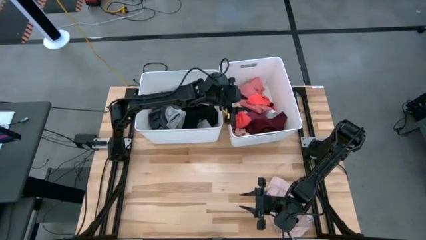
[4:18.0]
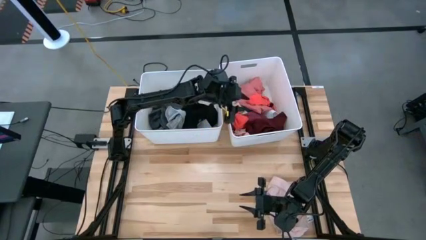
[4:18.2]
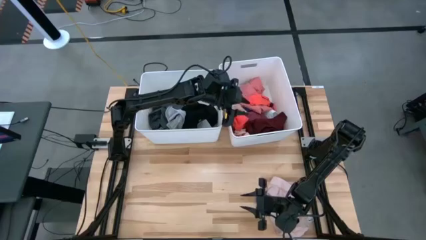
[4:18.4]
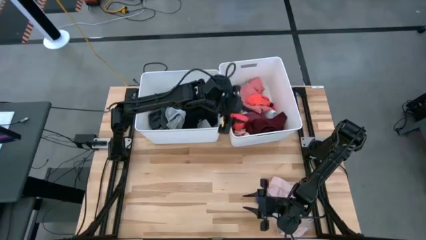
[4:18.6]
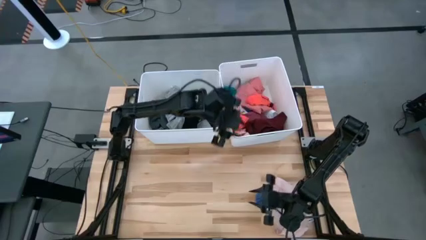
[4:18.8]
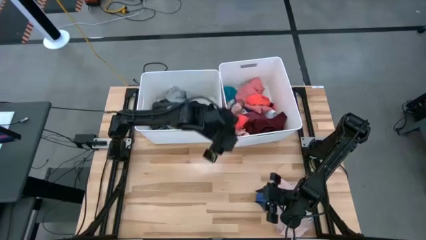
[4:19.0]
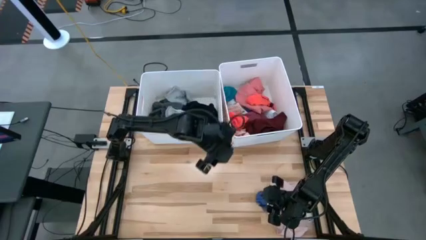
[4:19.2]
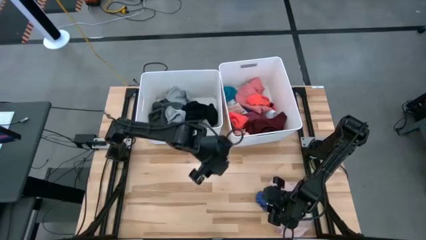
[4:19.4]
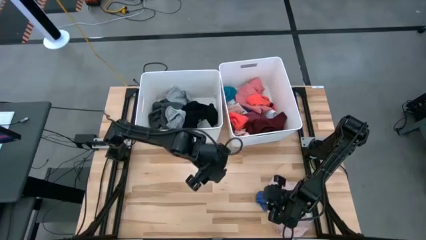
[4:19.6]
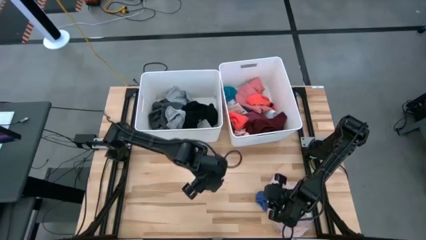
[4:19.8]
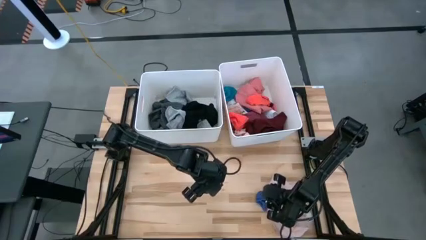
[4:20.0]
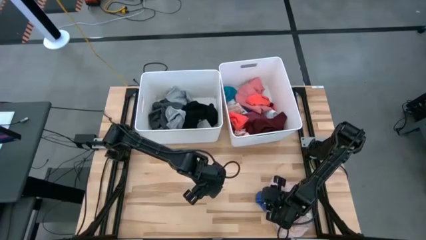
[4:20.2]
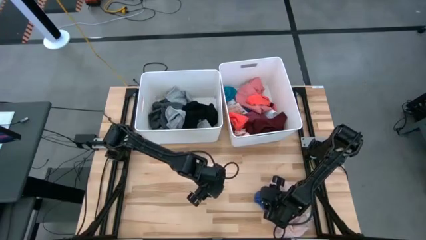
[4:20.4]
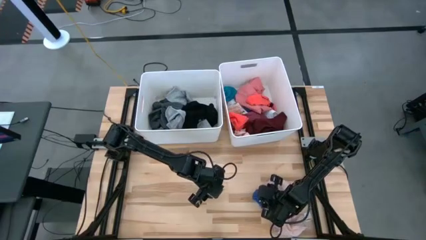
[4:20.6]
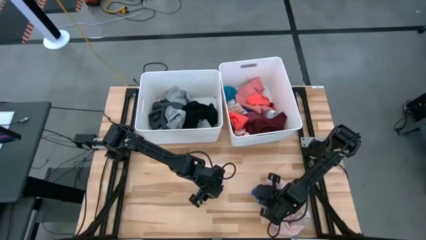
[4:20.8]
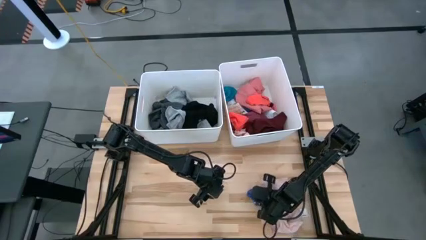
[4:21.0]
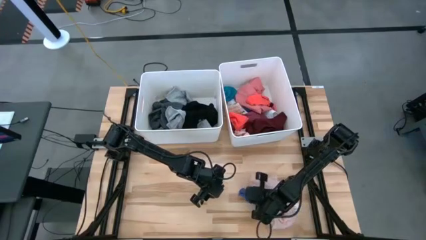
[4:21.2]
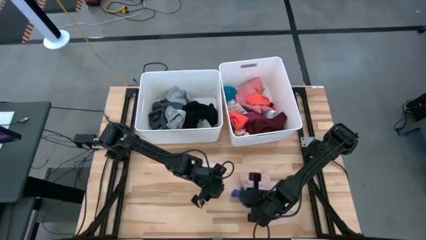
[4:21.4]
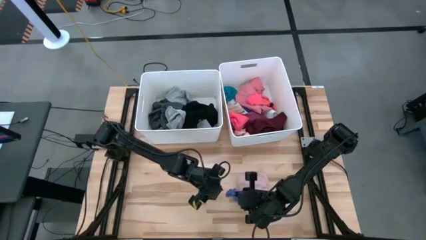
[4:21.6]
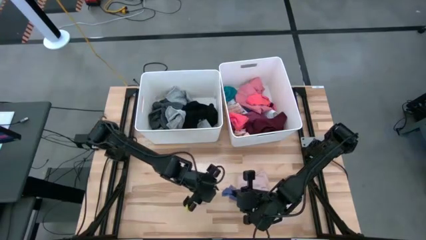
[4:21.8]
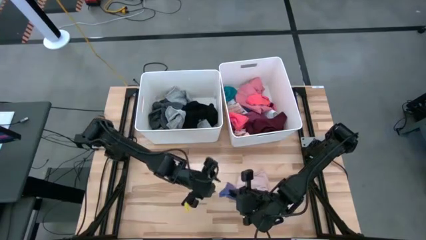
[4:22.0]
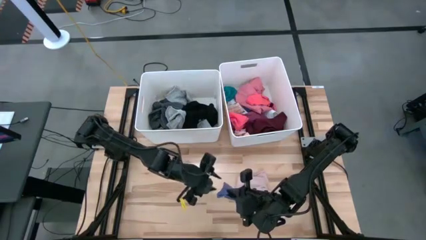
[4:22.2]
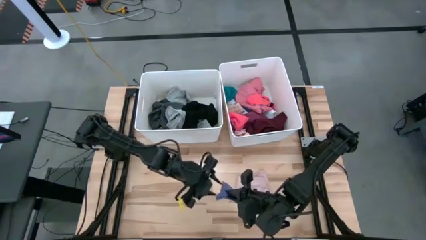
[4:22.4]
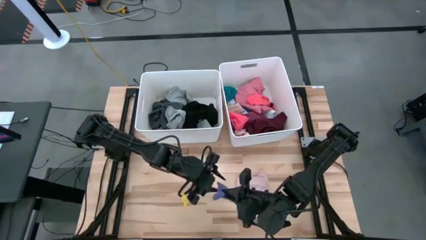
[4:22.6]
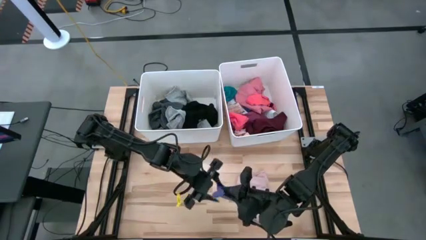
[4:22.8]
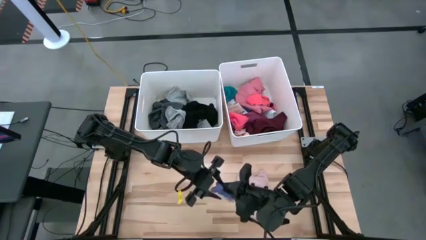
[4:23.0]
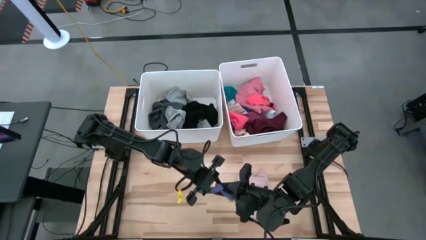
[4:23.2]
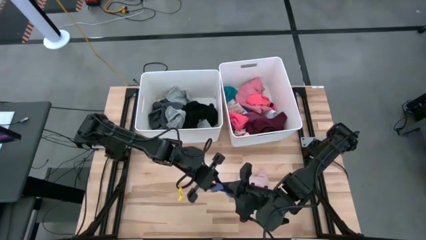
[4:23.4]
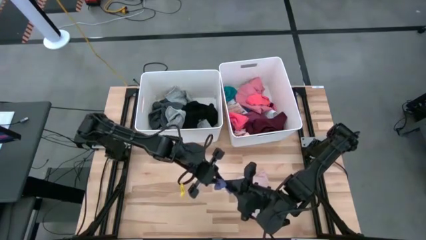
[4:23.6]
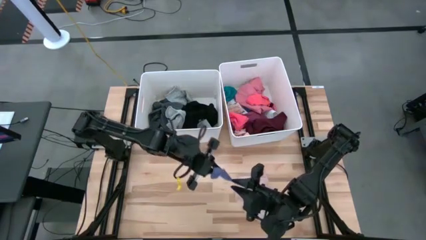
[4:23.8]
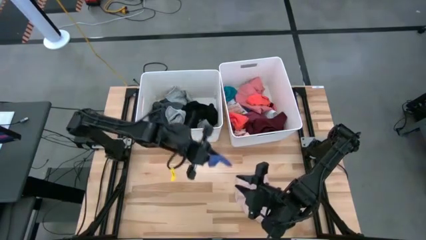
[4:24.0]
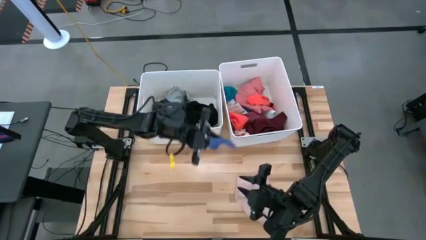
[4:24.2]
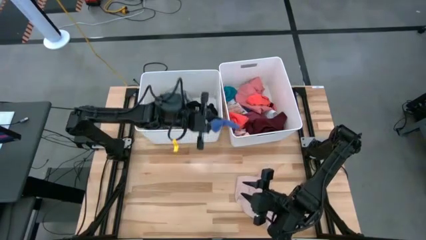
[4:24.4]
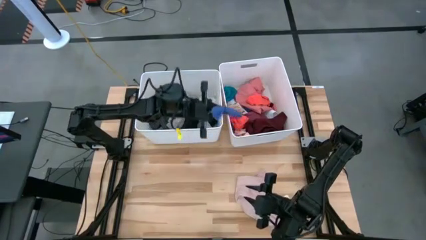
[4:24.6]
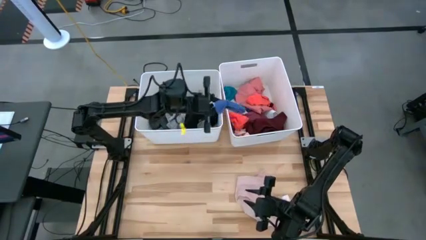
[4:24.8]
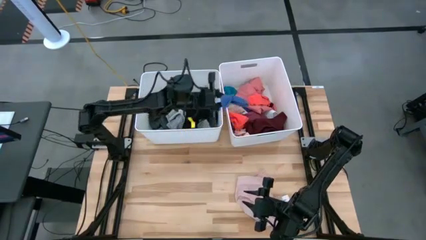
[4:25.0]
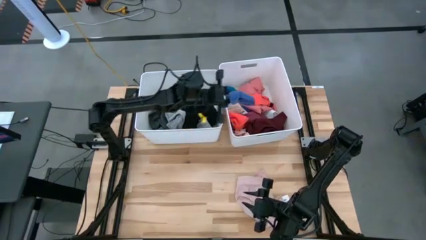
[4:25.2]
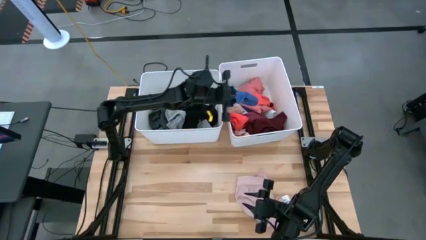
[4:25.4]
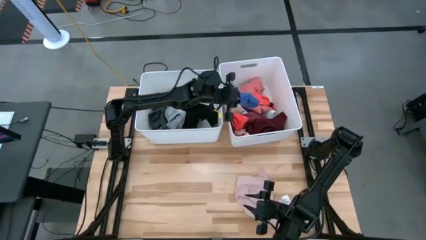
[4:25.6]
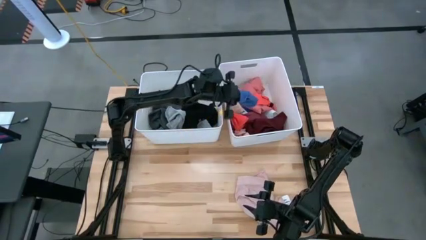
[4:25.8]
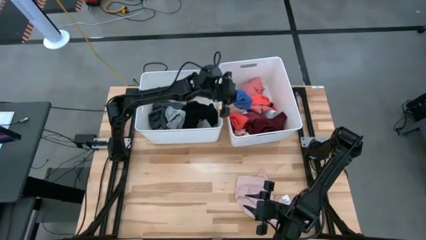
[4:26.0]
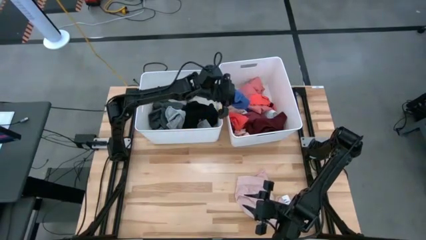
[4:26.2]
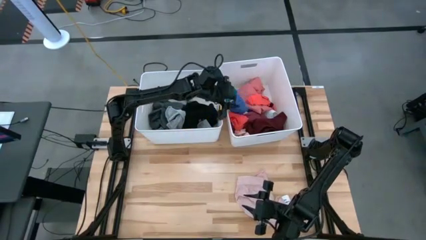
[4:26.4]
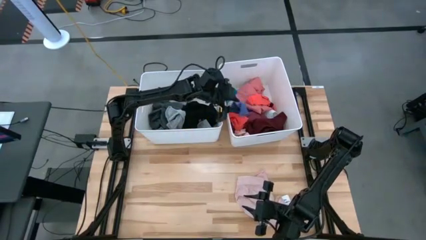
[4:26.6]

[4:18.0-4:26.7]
Task: Sort clothes
Put the blue sock into the right white laundry organizer

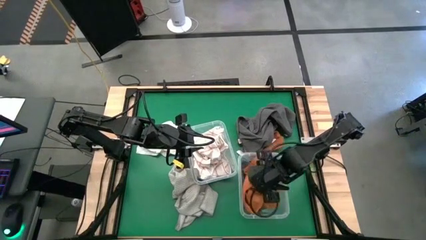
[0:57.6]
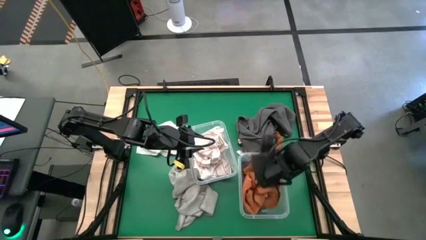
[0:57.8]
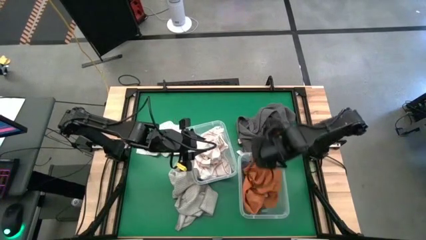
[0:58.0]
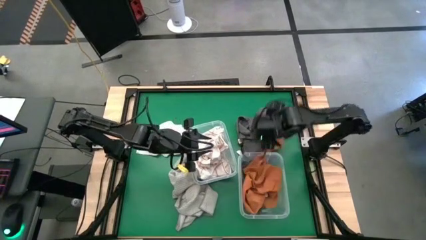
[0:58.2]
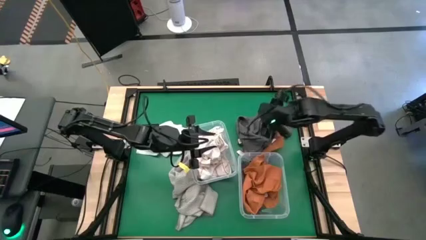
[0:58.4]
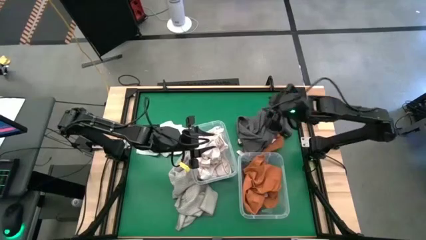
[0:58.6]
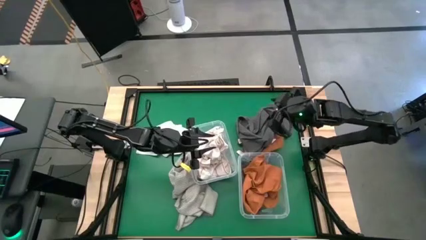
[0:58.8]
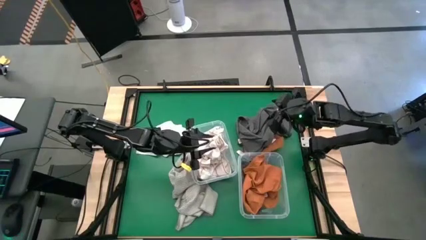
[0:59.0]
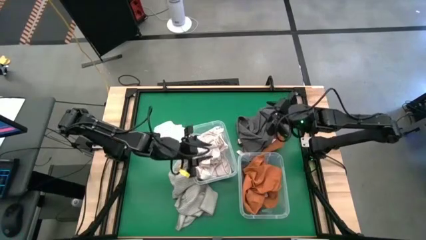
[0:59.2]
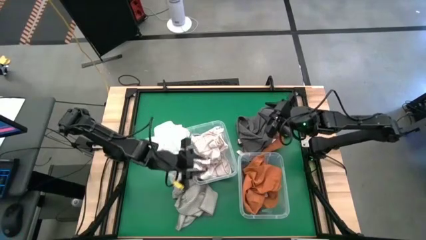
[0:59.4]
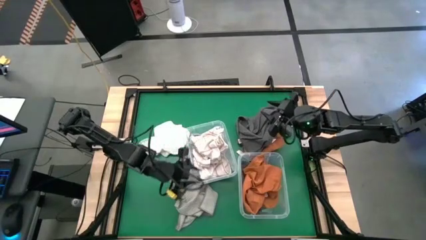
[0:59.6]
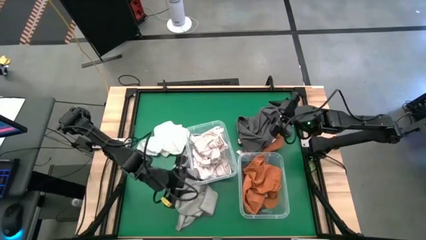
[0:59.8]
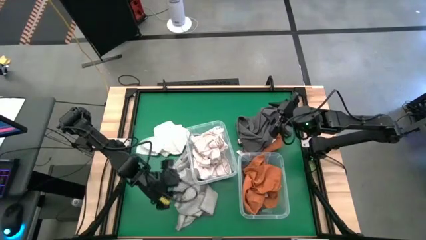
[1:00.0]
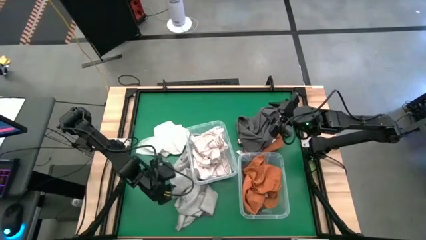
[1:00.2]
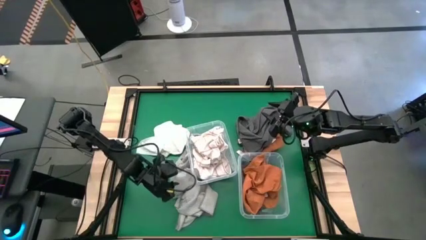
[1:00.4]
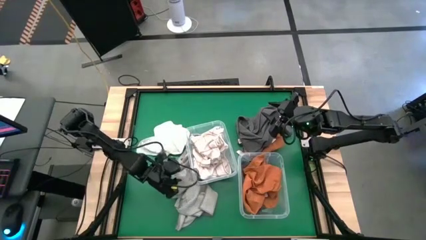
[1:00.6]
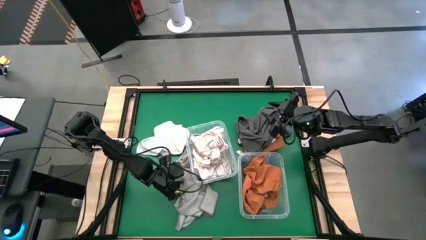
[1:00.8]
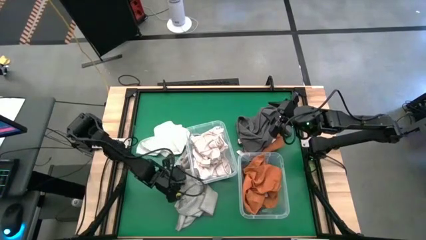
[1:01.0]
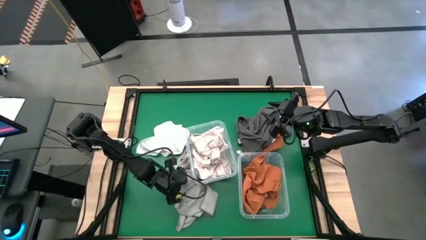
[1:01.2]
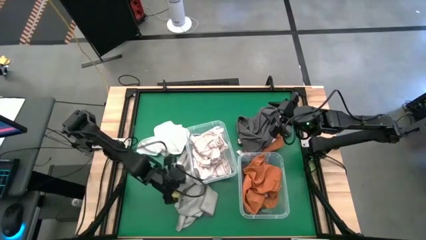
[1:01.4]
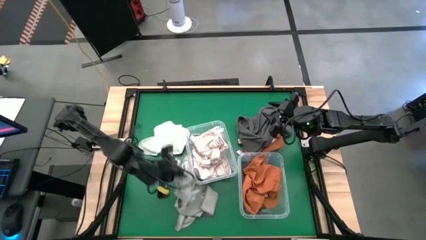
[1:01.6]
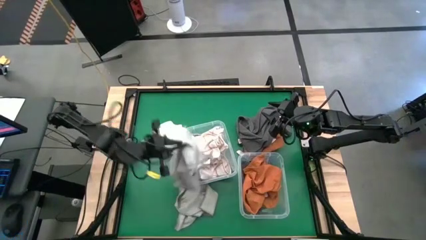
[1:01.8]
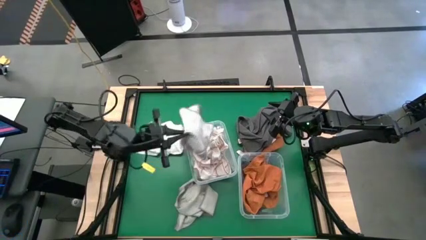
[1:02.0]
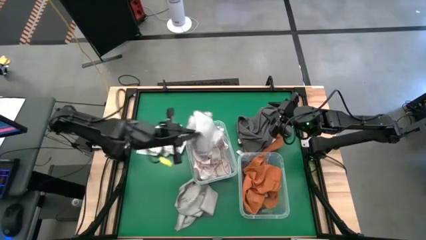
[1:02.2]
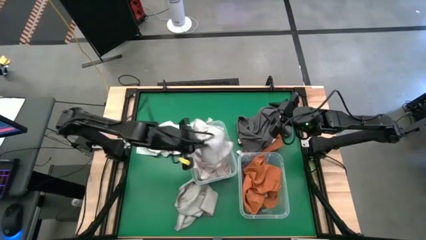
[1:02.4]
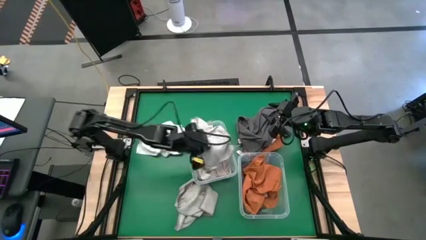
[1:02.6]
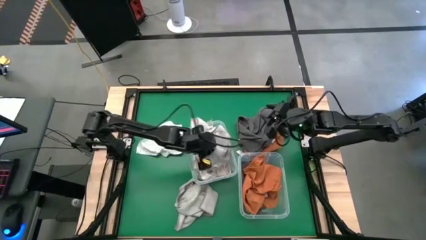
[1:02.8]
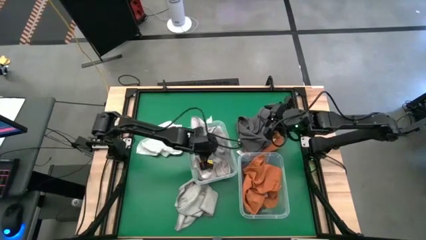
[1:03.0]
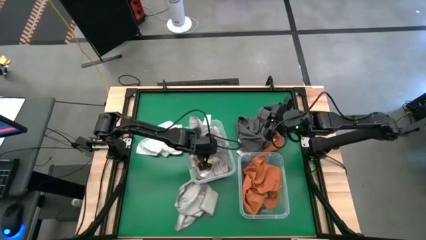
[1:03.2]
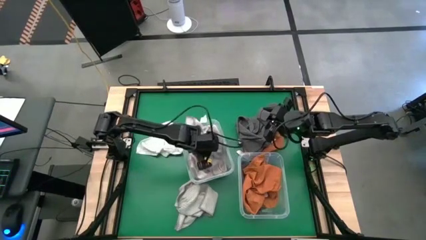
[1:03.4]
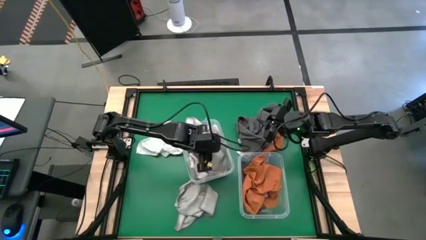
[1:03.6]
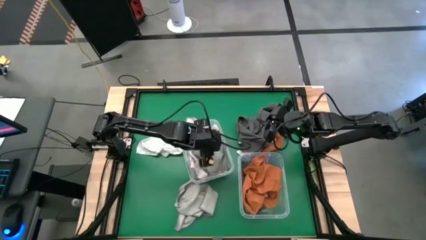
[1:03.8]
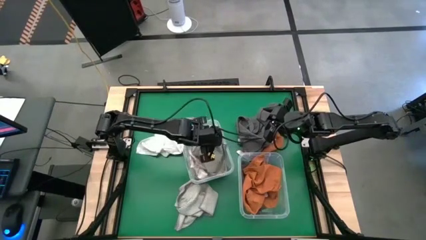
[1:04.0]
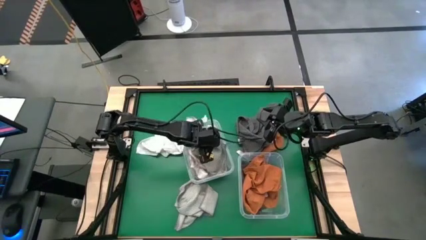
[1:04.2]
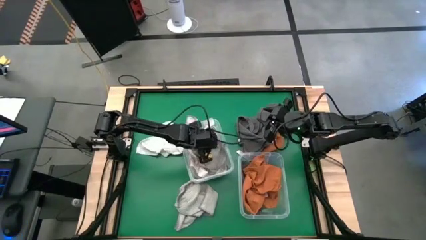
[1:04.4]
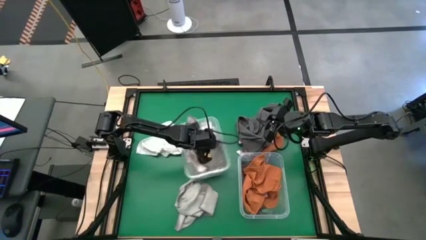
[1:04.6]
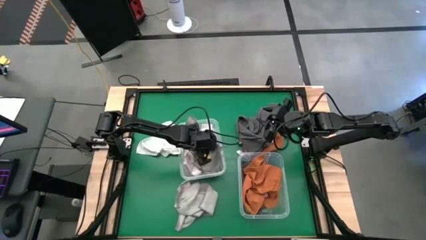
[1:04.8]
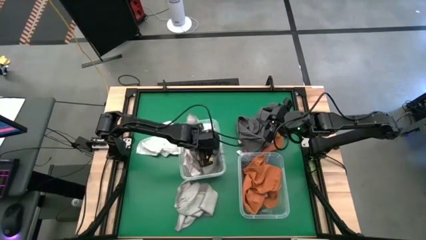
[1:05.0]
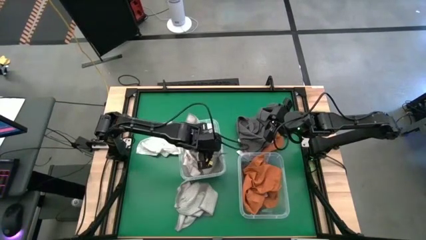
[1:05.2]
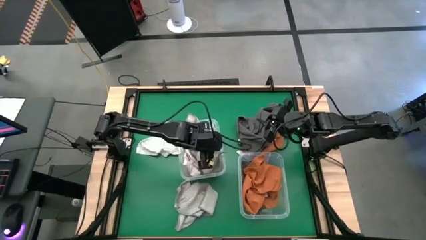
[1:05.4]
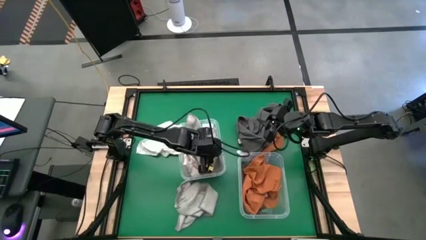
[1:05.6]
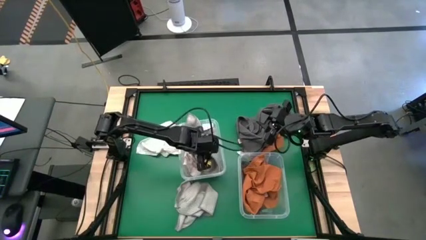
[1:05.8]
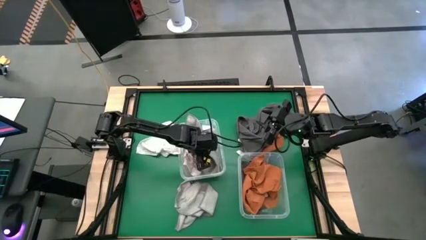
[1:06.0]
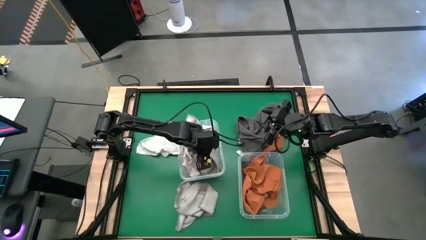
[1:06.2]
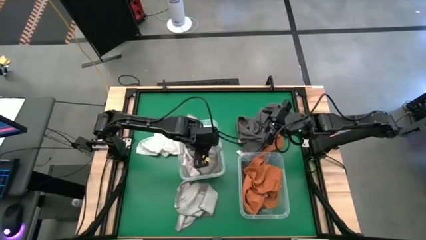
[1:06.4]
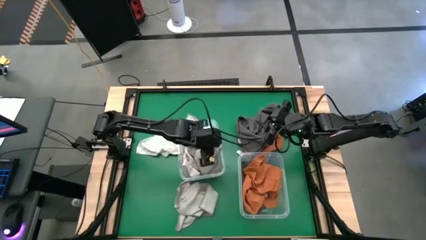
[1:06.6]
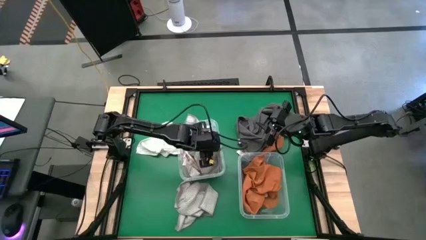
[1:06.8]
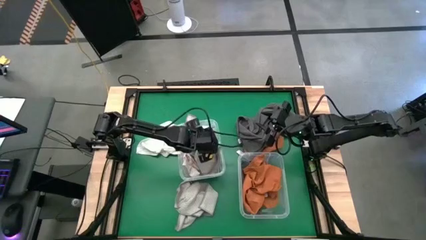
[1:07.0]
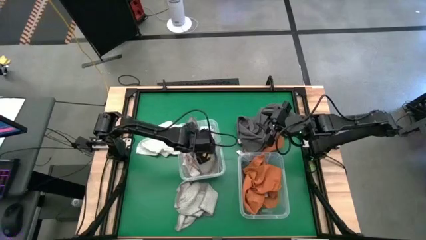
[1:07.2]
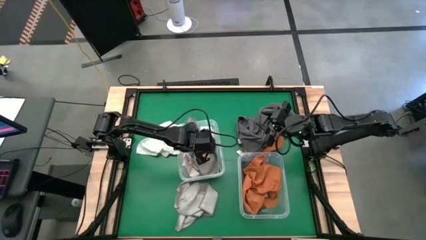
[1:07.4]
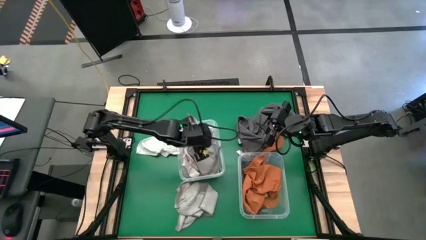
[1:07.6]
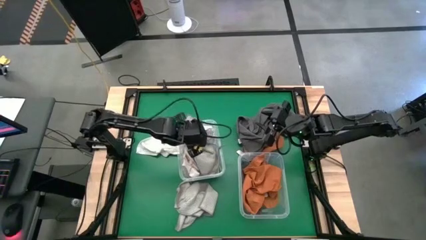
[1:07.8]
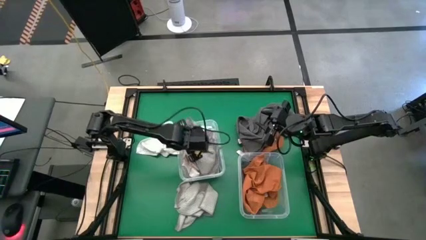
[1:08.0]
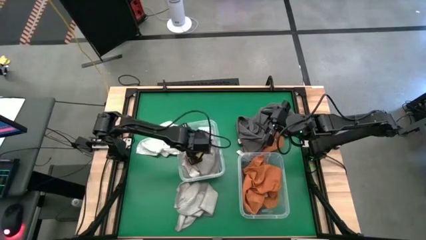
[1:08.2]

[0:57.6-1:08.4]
Task: Sort microfiber towel by color & place in baskets
Put the light grey microfiber towel into the left transparent bin
